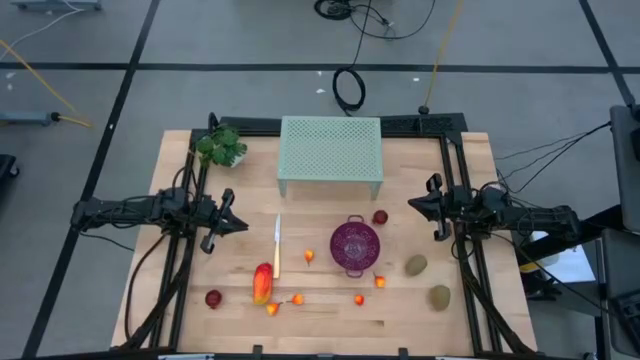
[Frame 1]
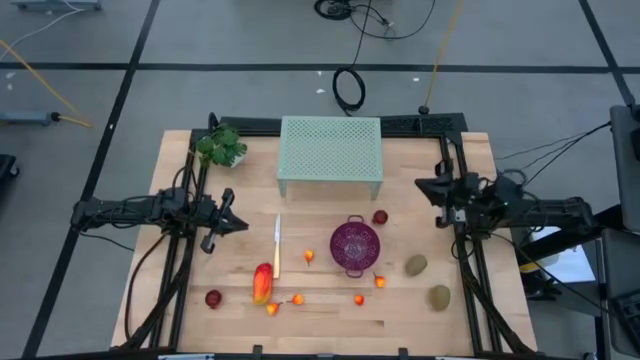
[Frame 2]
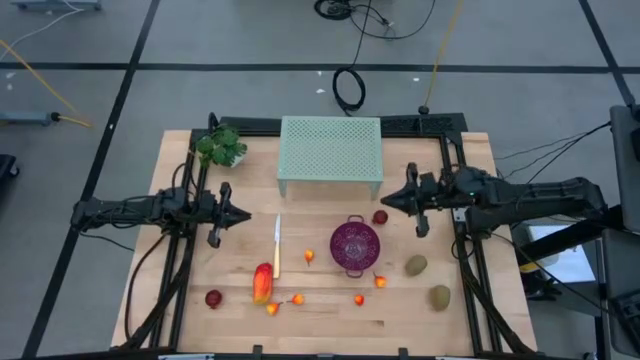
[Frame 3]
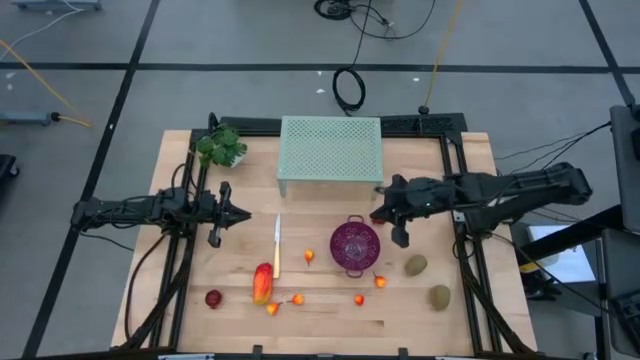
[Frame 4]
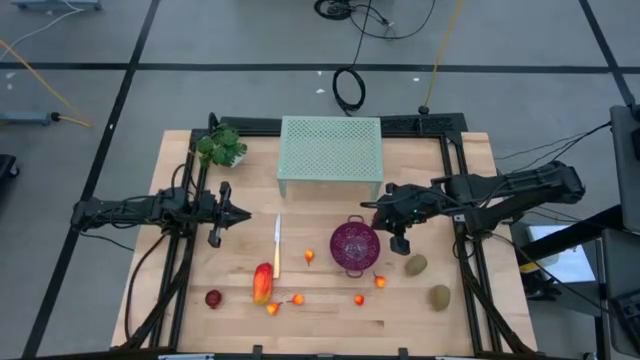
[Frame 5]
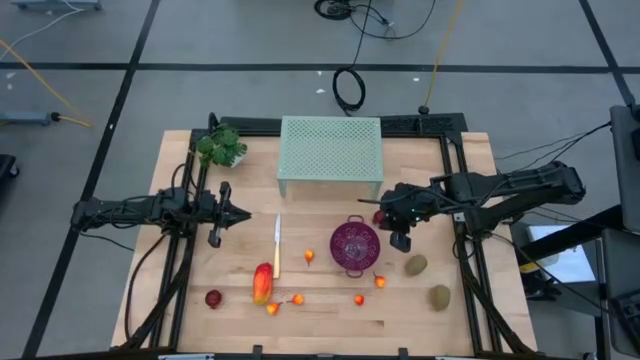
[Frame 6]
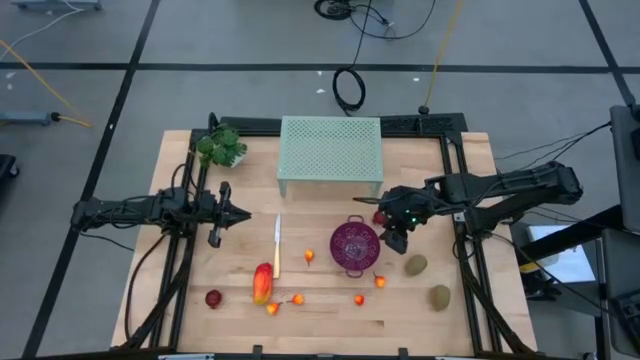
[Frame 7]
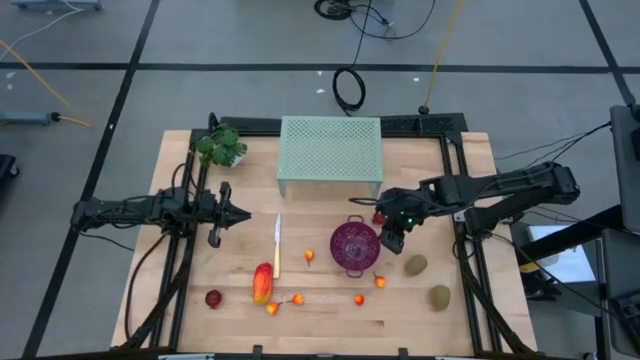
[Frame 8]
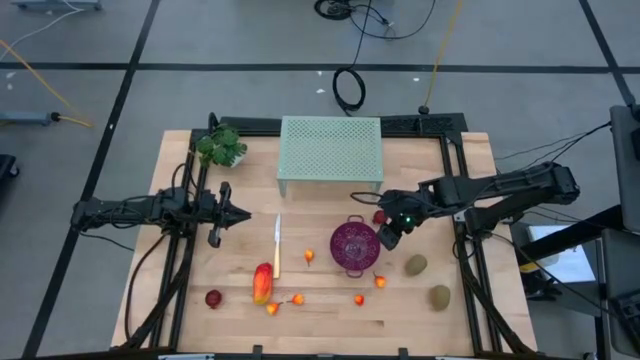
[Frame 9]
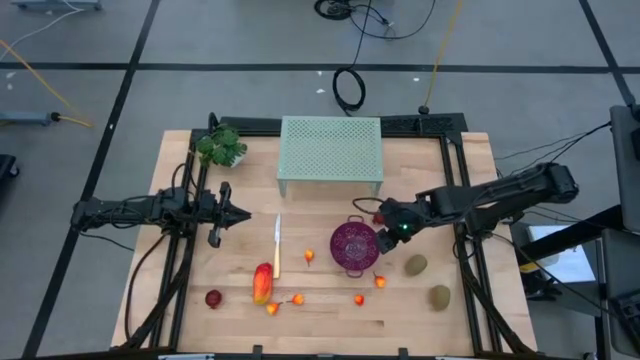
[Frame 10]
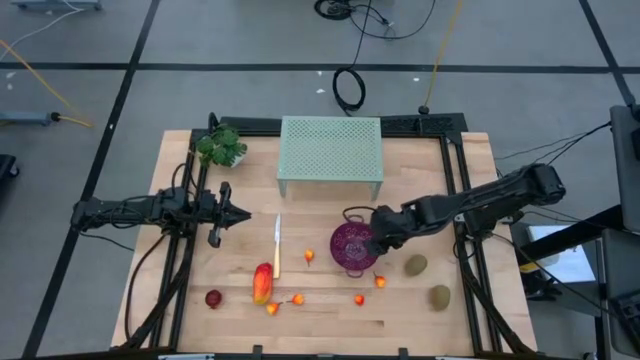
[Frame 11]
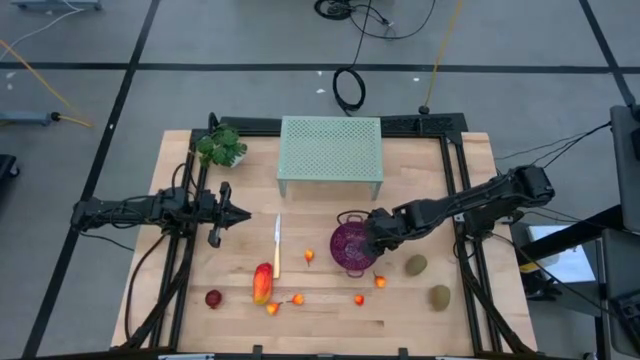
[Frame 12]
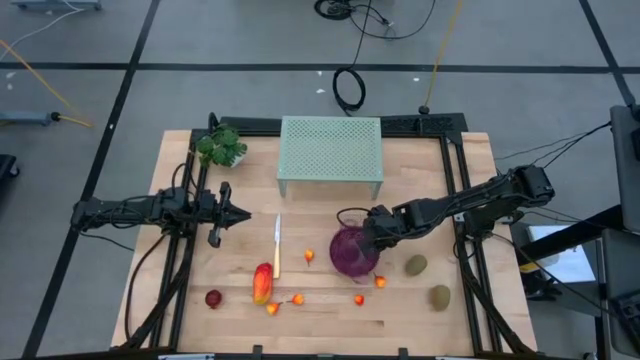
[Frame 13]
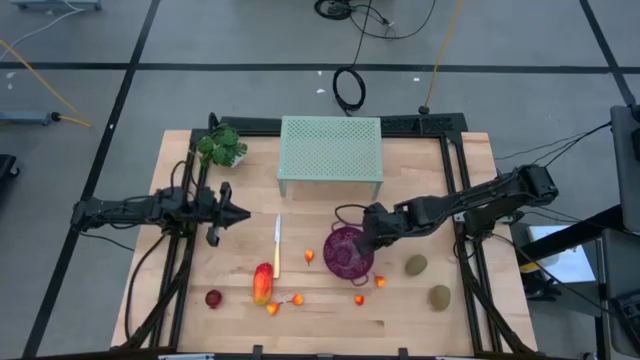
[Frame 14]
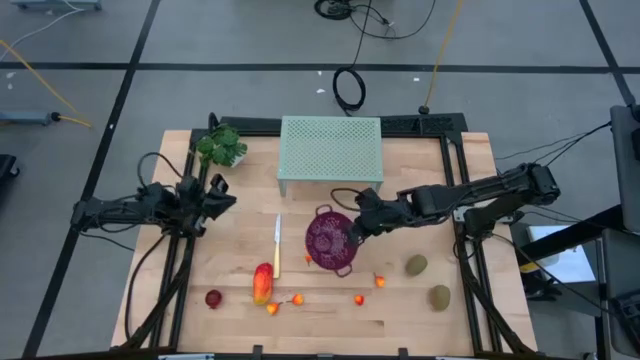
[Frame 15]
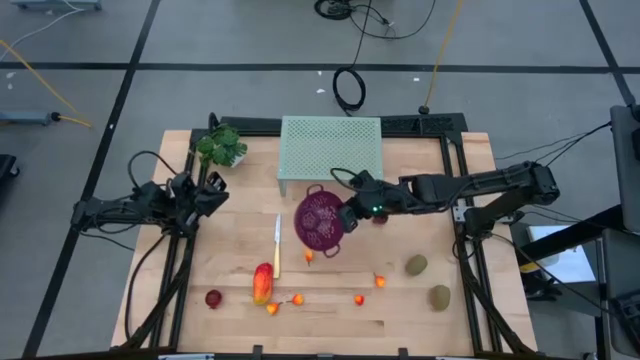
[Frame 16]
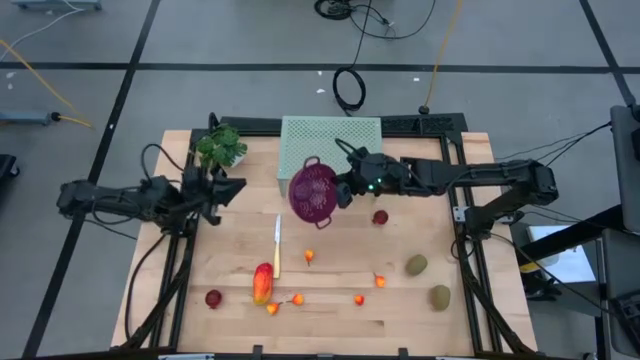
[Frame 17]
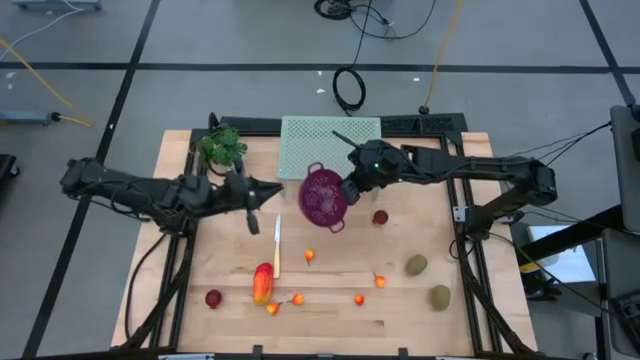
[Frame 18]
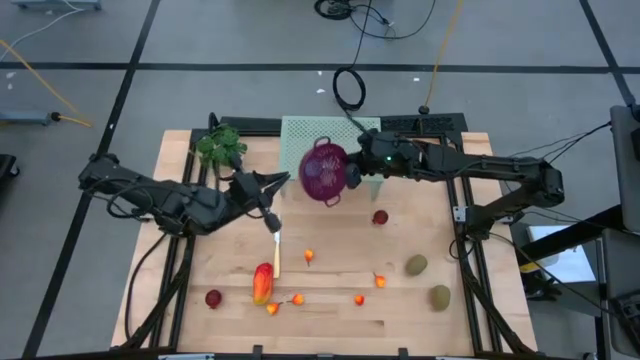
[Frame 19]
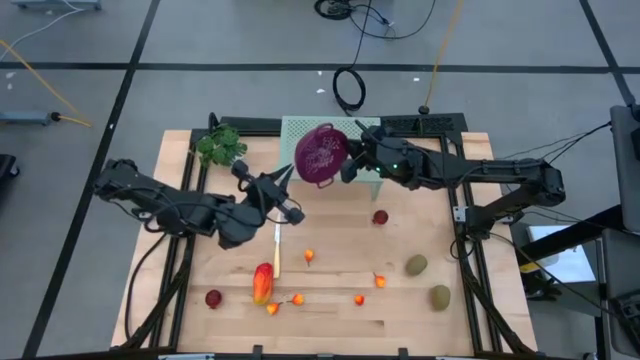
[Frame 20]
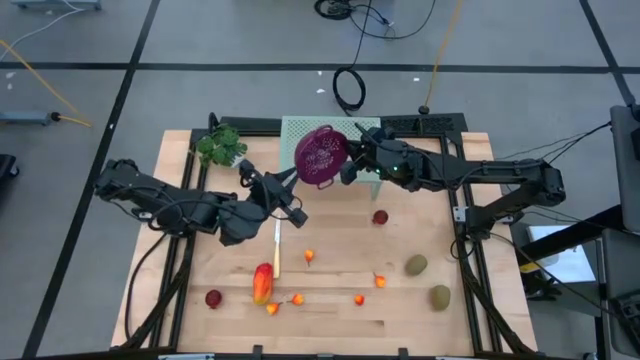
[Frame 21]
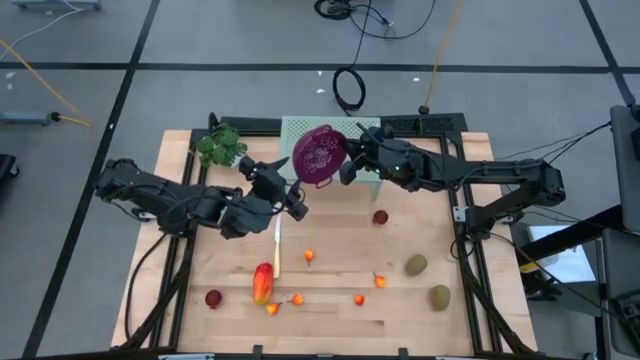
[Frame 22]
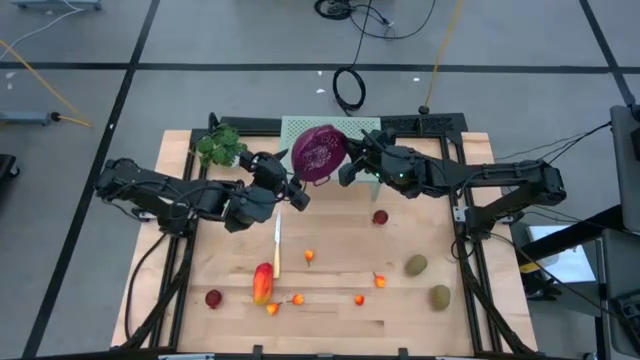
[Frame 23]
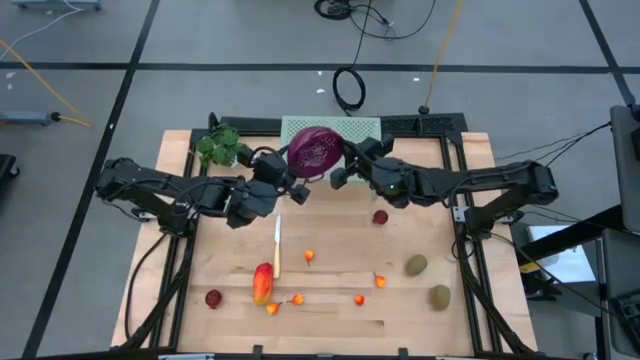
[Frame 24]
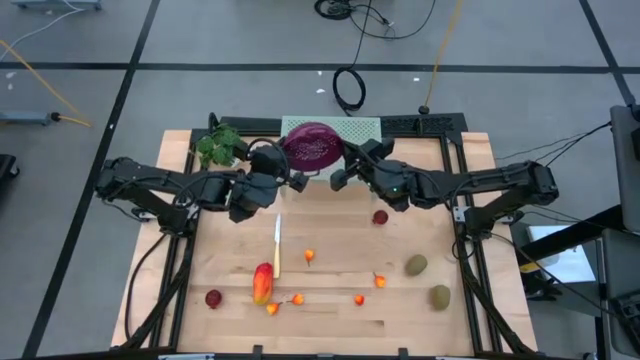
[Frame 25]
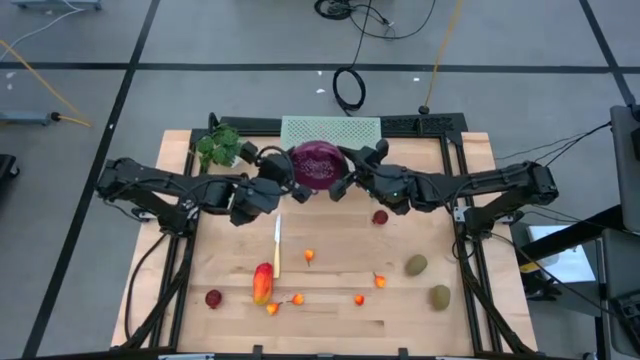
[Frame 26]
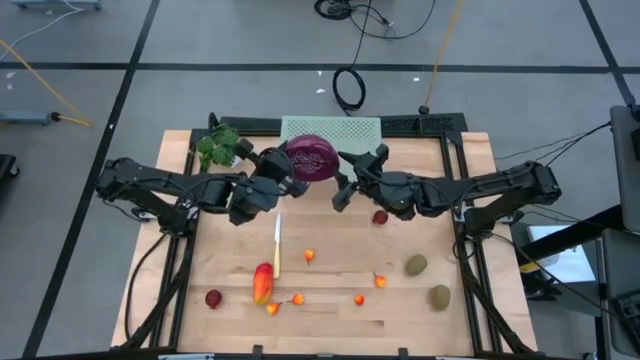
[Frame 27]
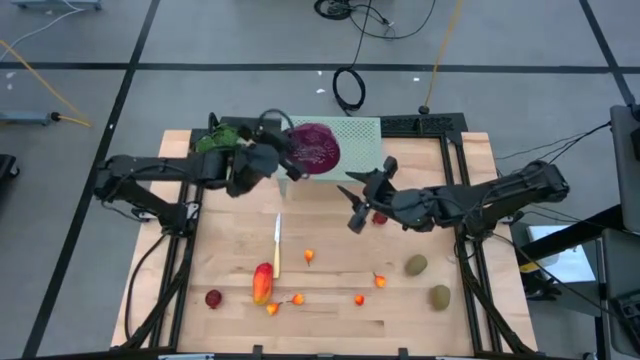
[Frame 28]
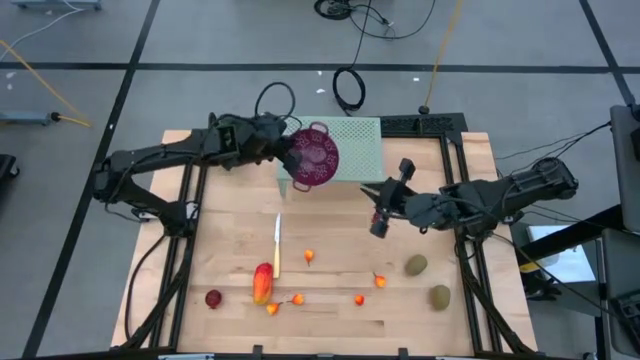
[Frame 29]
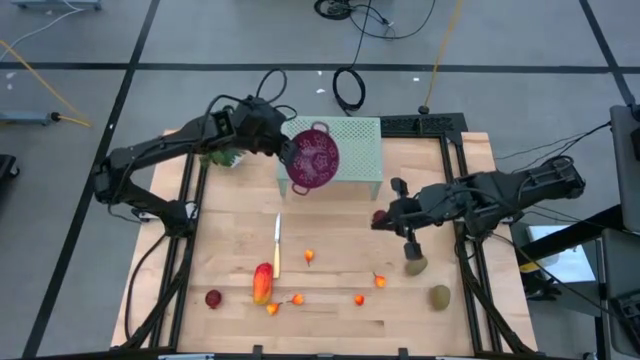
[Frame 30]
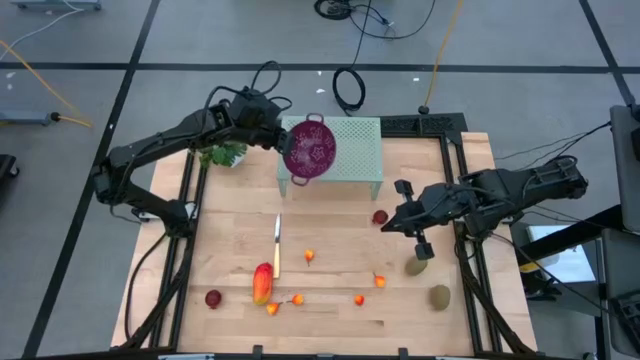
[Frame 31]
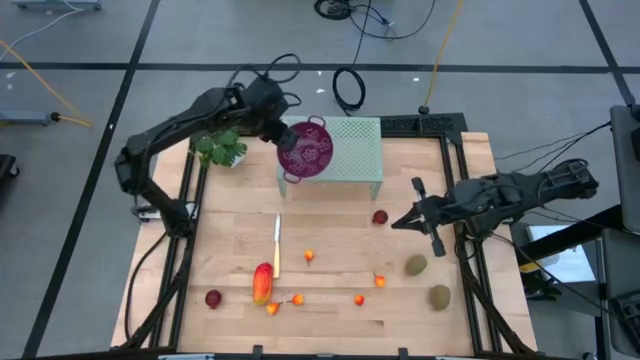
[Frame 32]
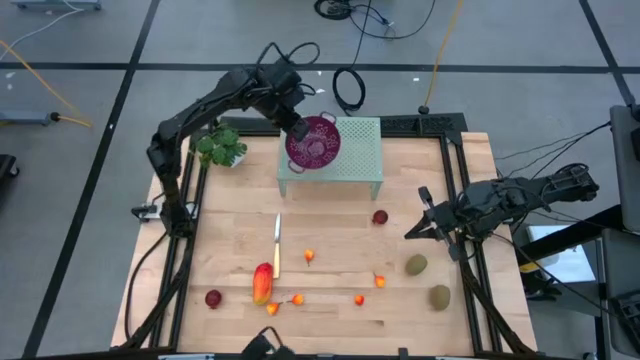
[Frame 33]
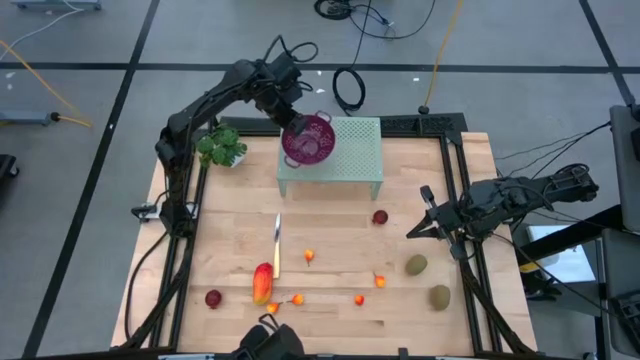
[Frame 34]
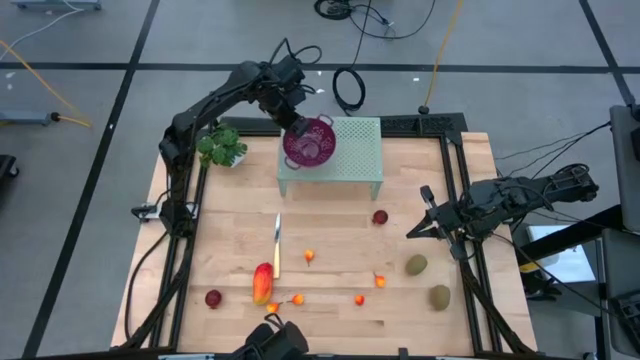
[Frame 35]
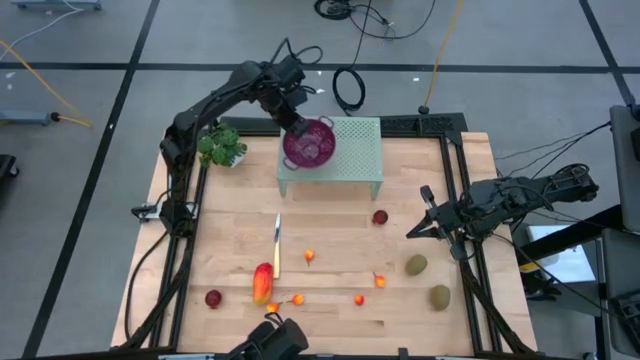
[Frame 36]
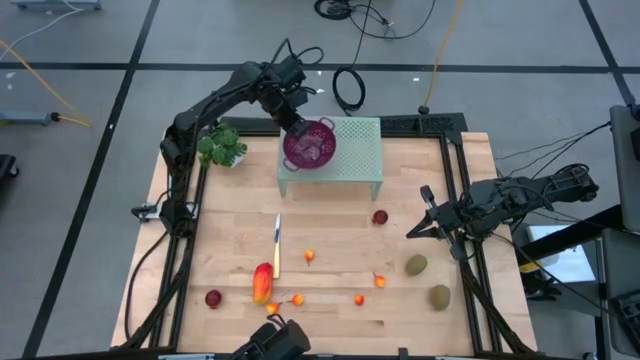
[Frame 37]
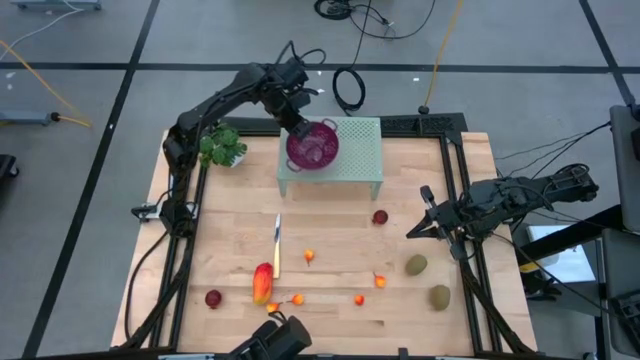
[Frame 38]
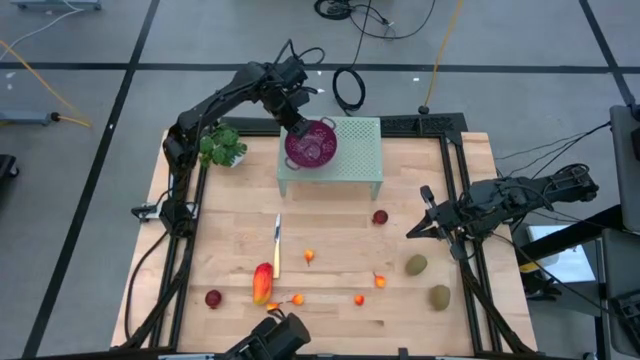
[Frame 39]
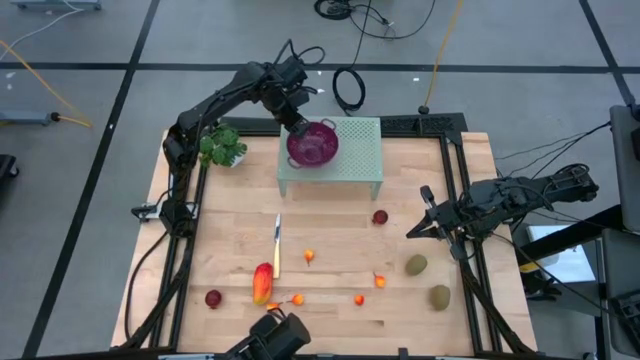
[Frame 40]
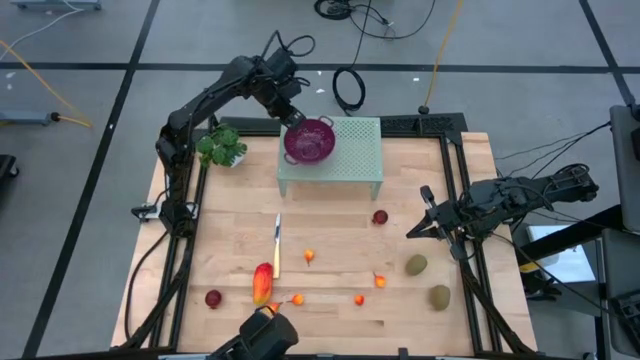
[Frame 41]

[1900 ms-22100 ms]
Task: Pick & Place Fruit
Put the strainer bowl on the shelf
